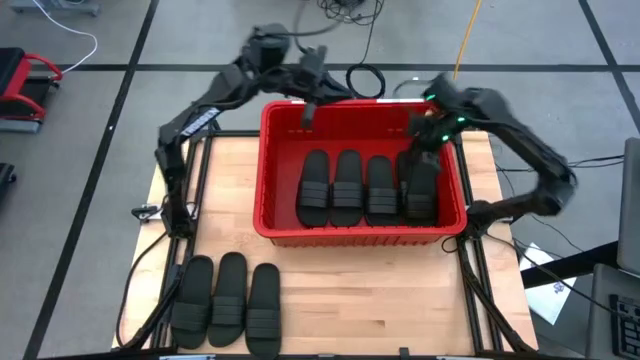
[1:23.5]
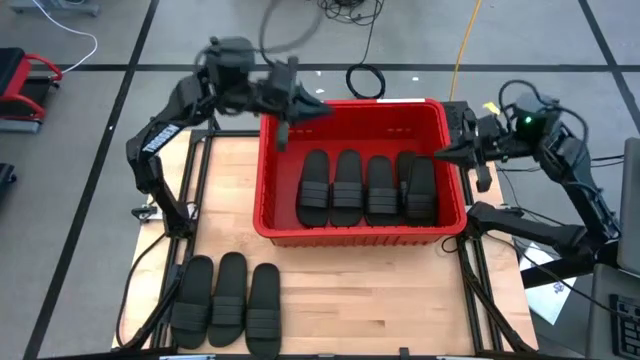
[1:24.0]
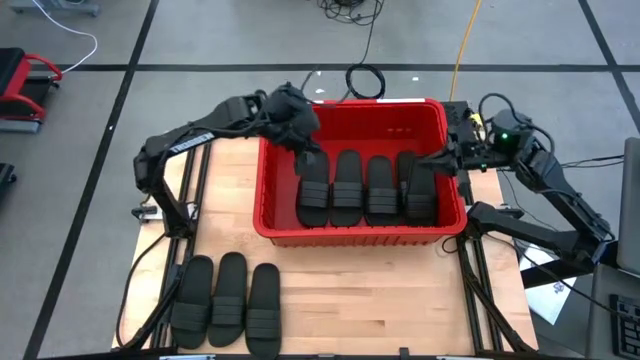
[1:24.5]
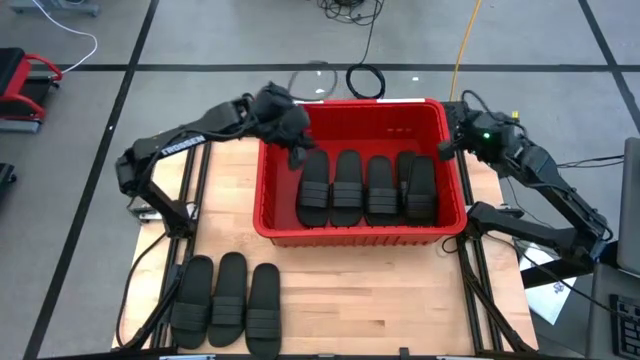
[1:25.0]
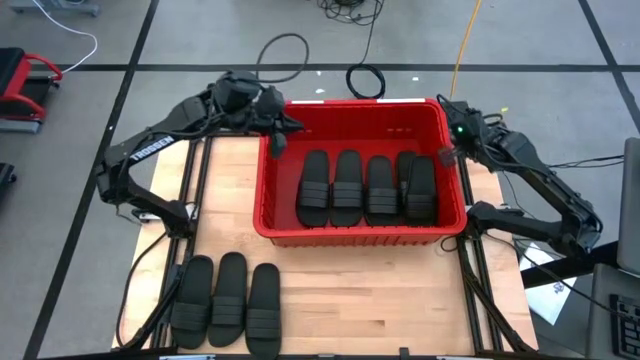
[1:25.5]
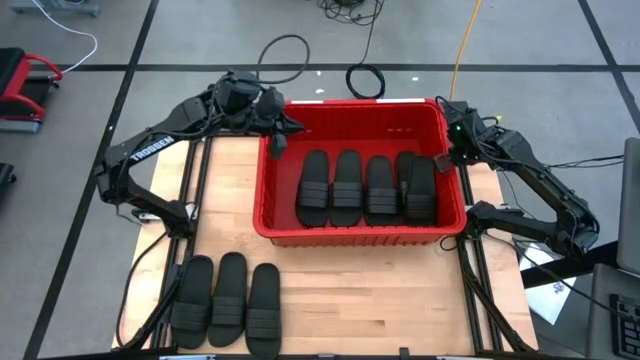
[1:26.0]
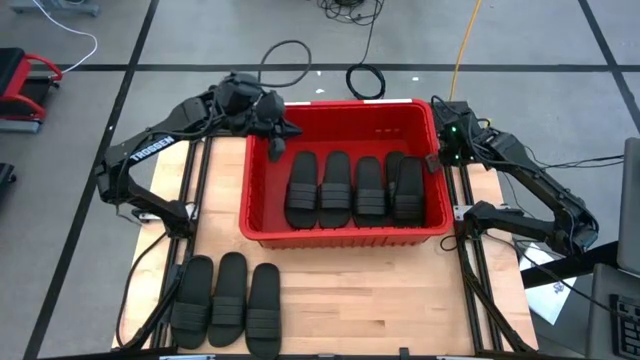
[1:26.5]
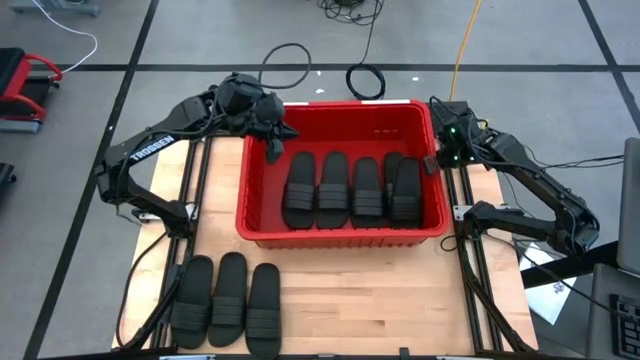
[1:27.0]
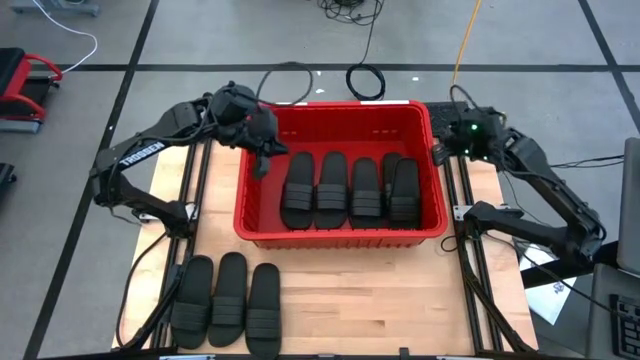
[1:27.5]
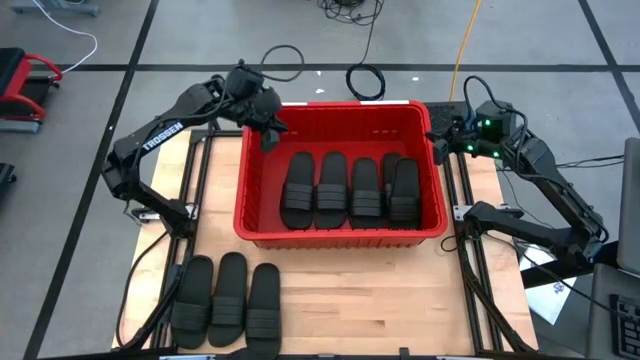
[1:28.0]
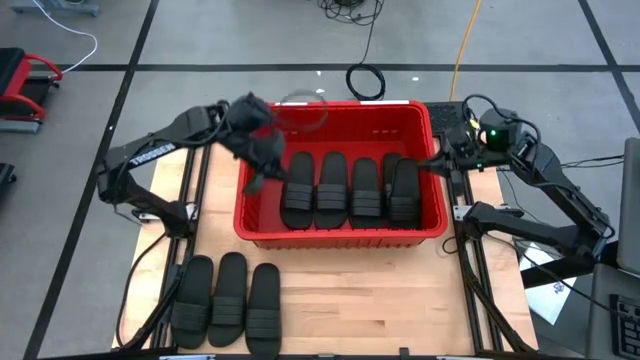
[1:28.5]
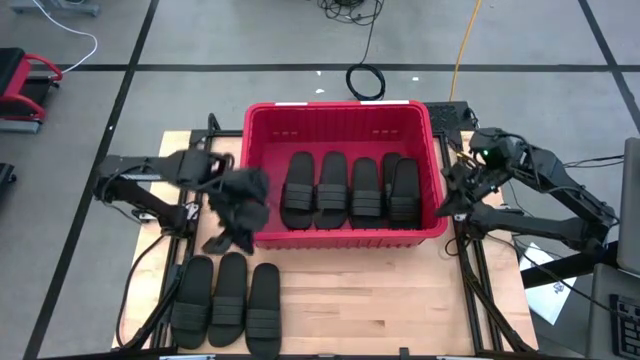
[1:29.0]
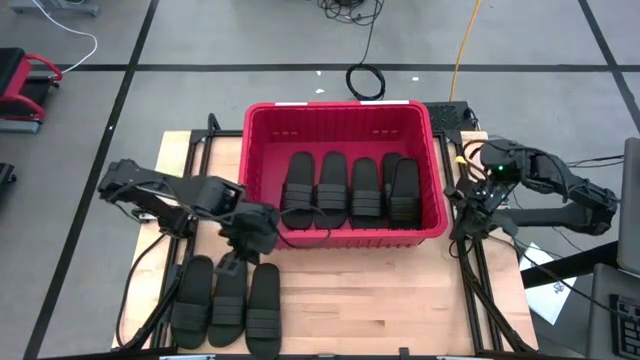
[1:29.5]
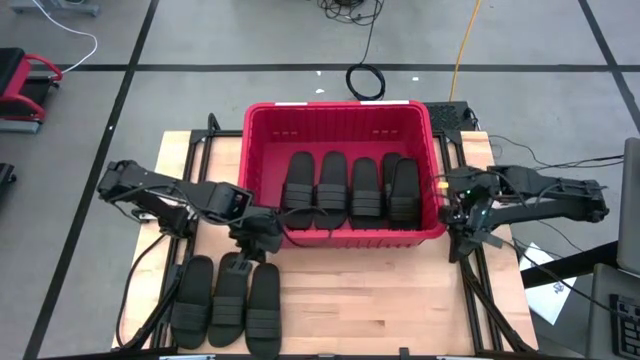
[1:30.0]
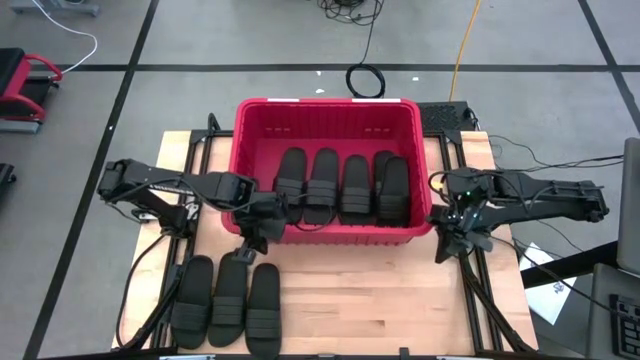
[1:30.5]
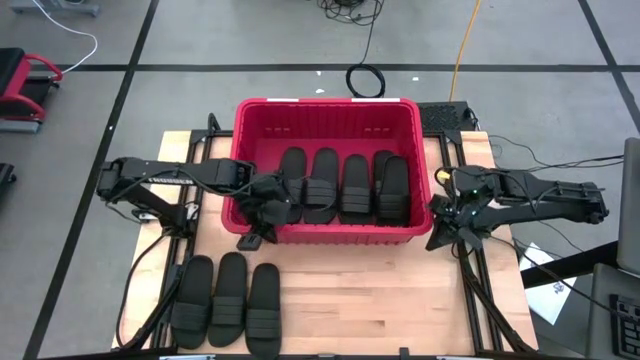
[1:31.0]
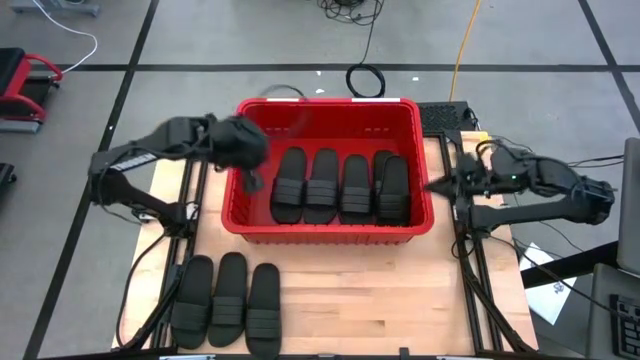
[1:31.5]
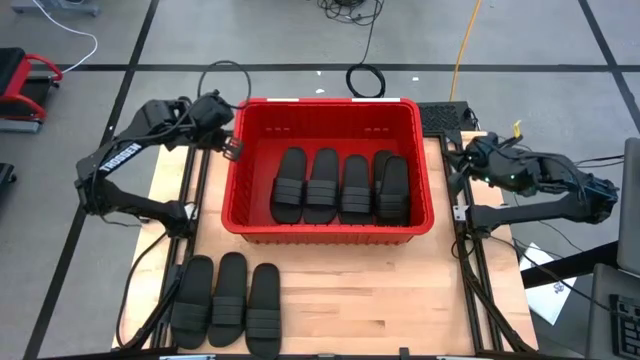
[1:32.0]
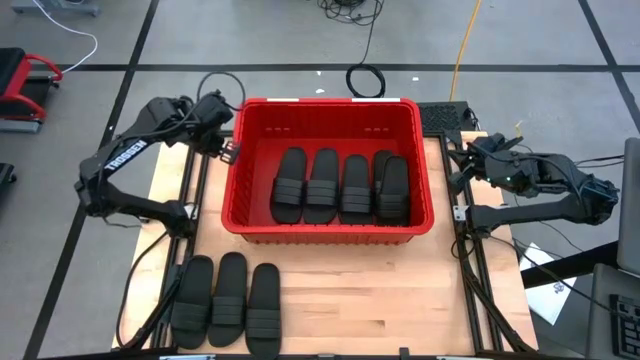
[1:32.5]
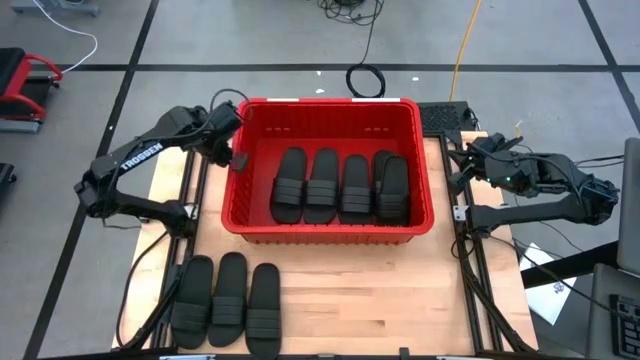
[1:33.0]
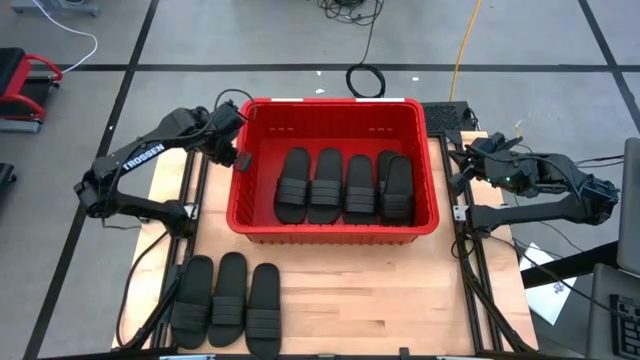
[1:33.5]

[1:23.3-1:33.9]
Task: Pick and place slides into bin
Adjust the red bin

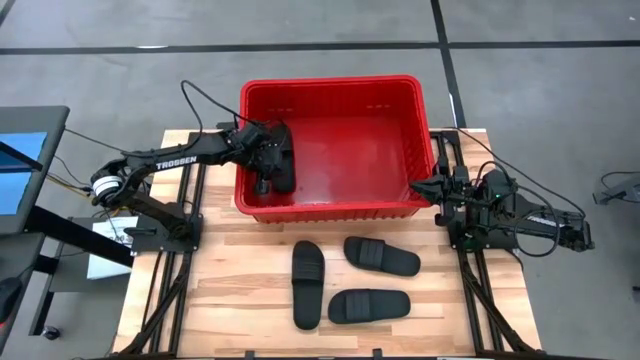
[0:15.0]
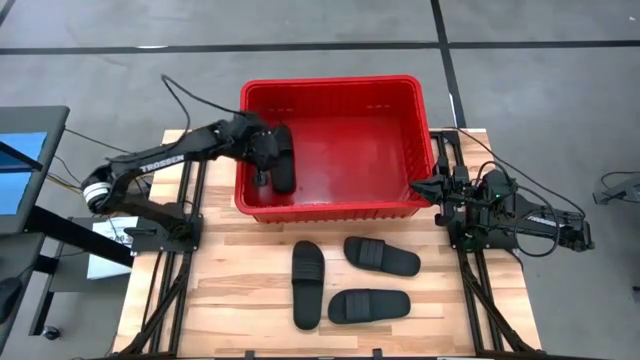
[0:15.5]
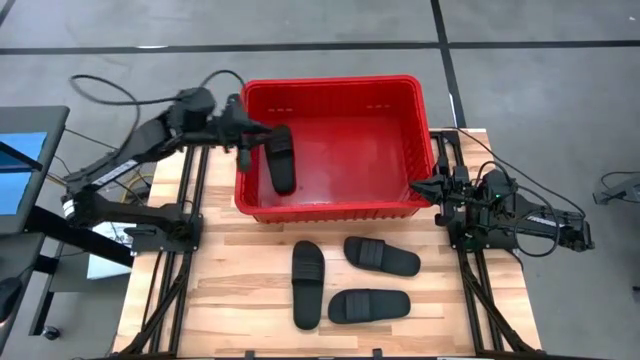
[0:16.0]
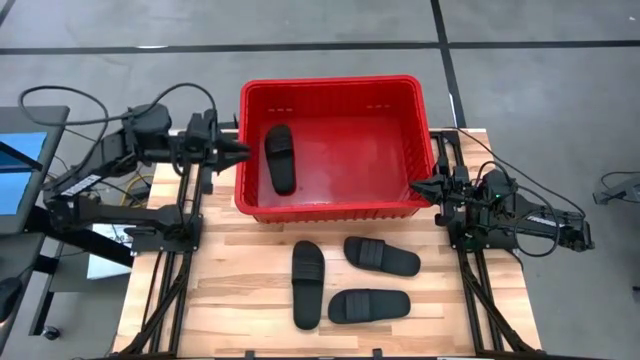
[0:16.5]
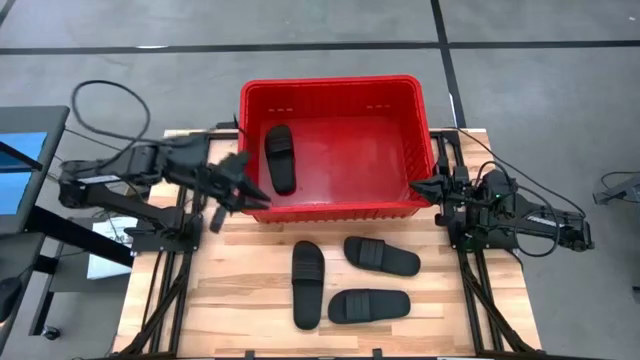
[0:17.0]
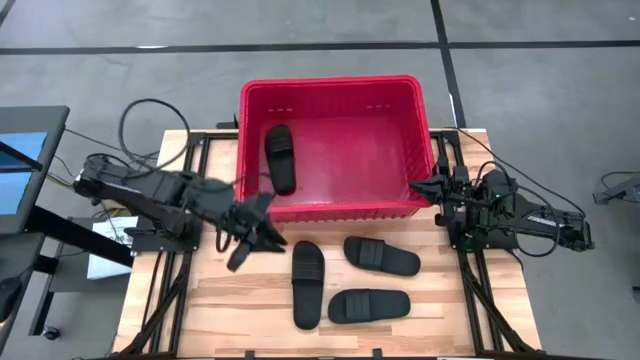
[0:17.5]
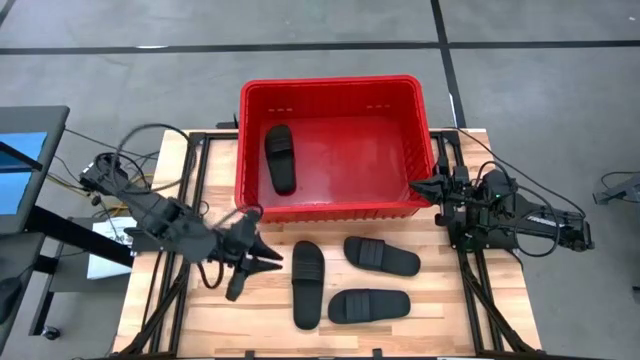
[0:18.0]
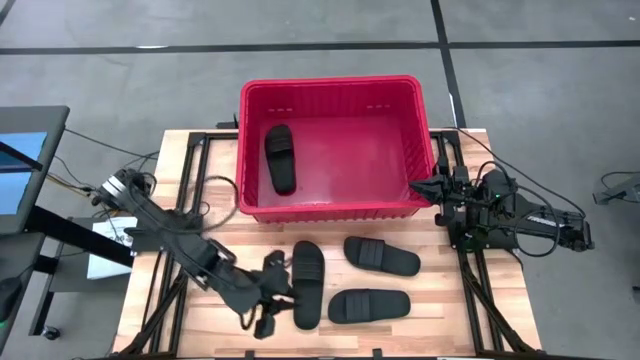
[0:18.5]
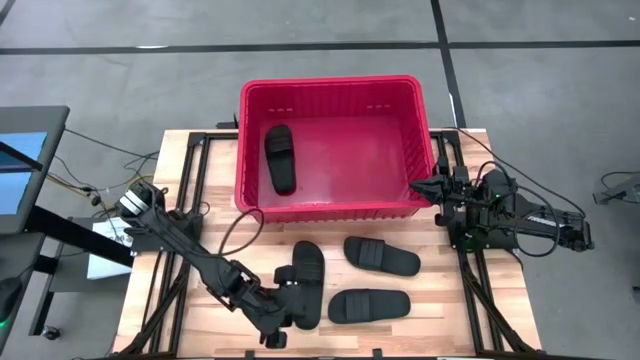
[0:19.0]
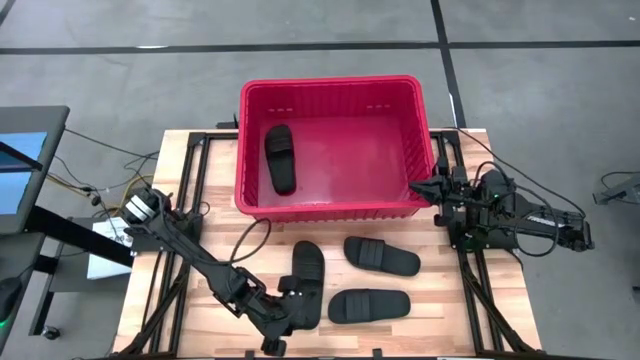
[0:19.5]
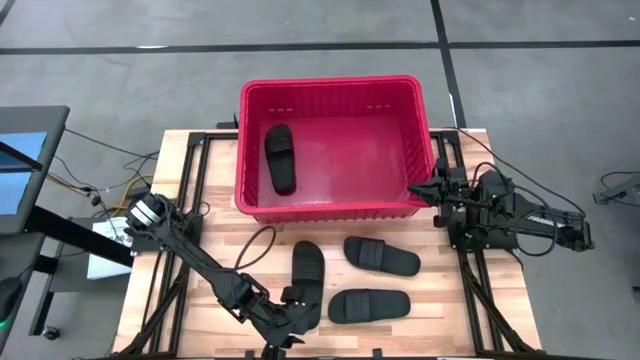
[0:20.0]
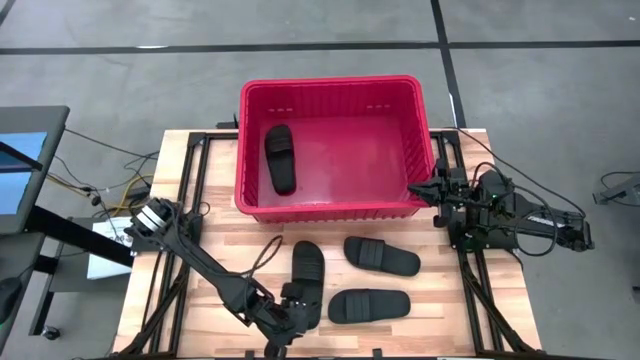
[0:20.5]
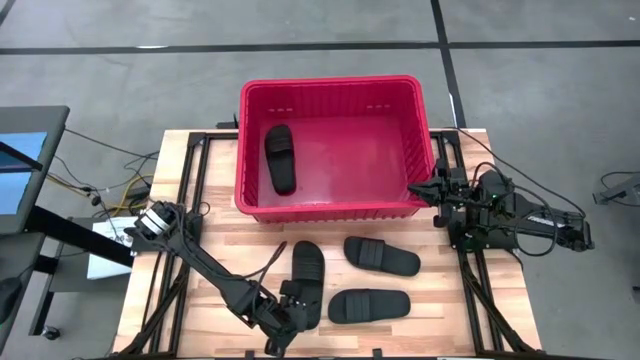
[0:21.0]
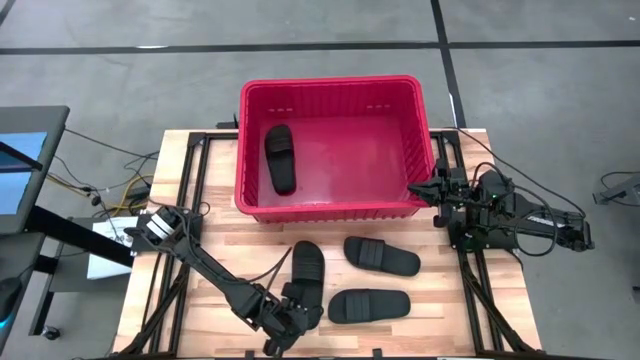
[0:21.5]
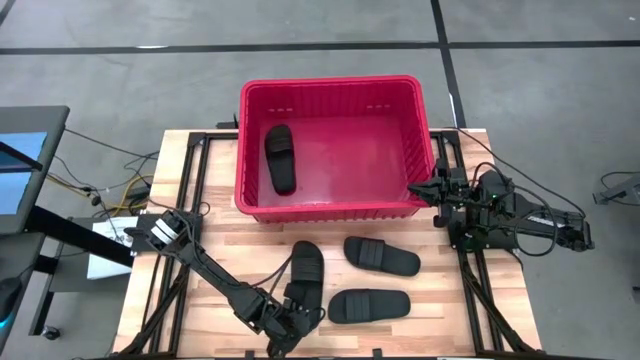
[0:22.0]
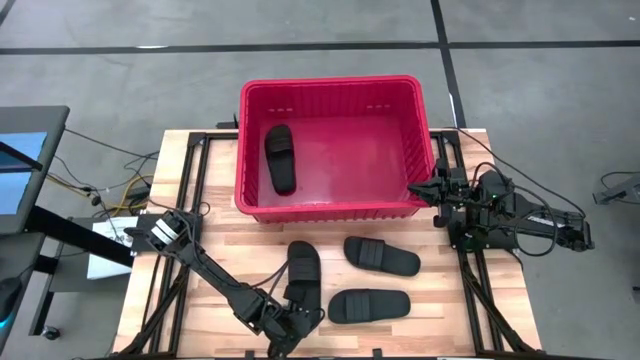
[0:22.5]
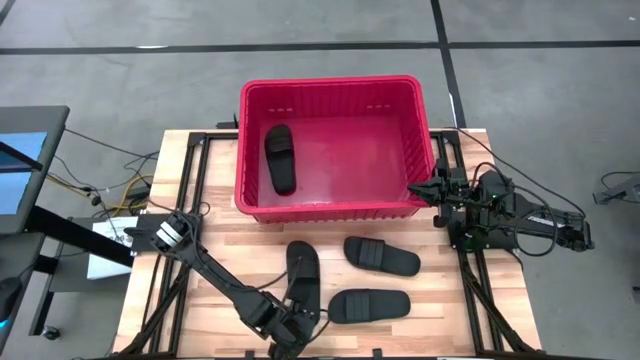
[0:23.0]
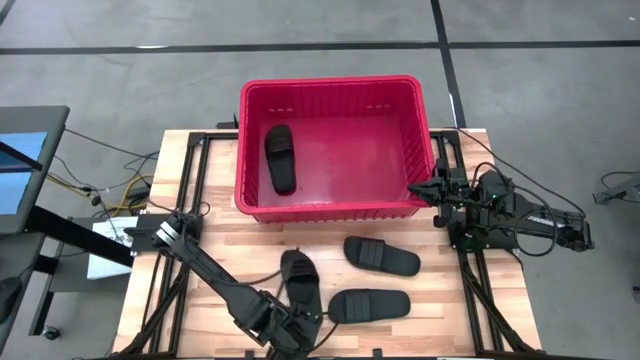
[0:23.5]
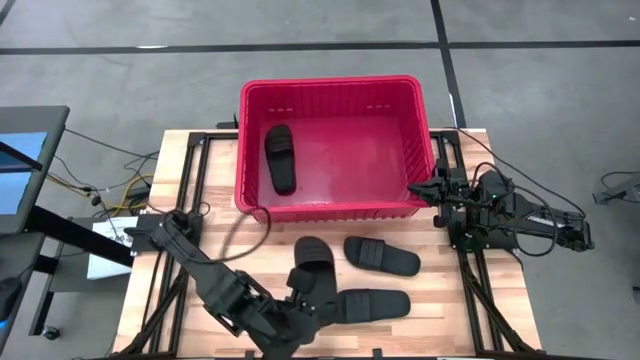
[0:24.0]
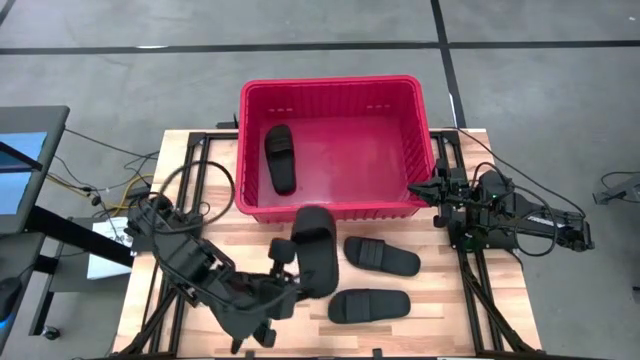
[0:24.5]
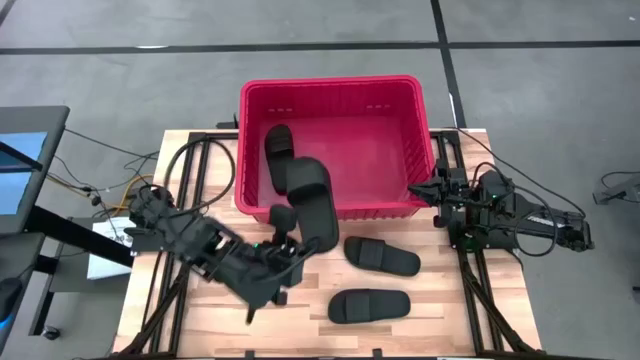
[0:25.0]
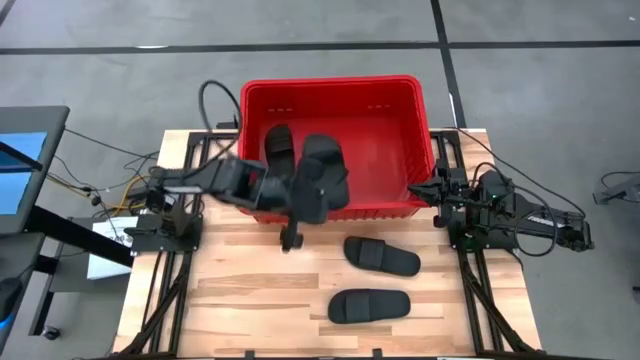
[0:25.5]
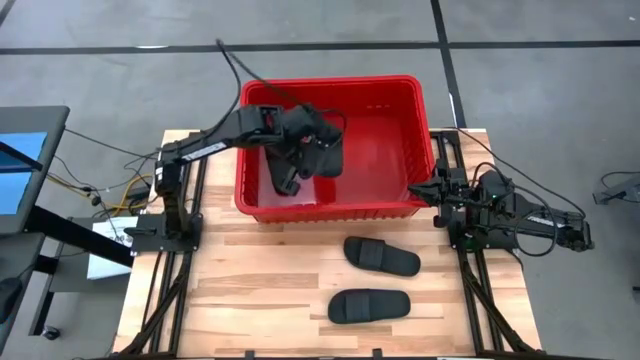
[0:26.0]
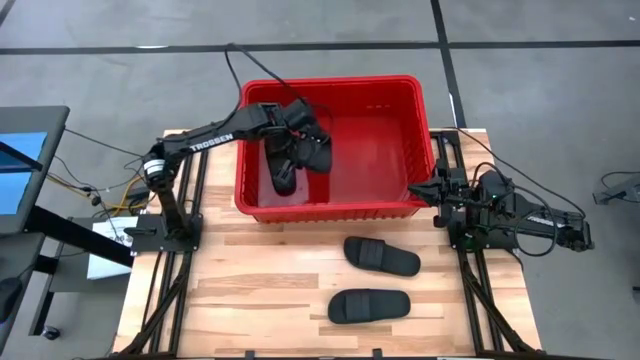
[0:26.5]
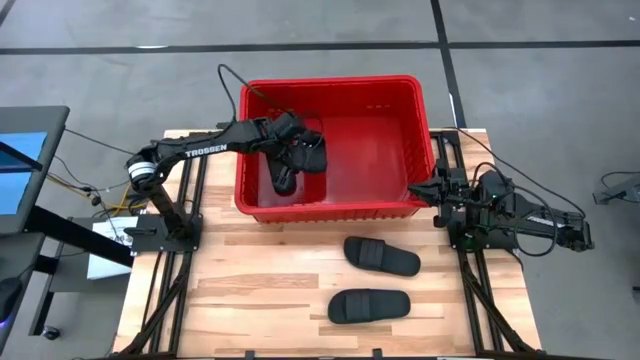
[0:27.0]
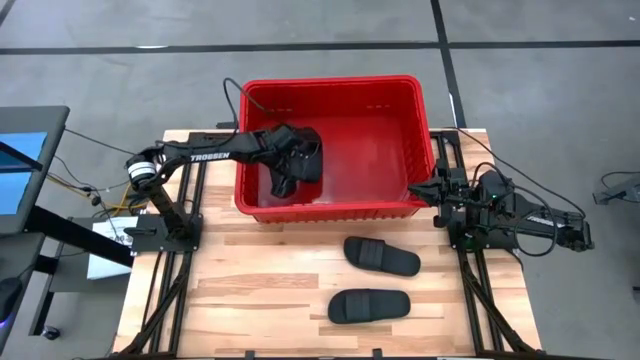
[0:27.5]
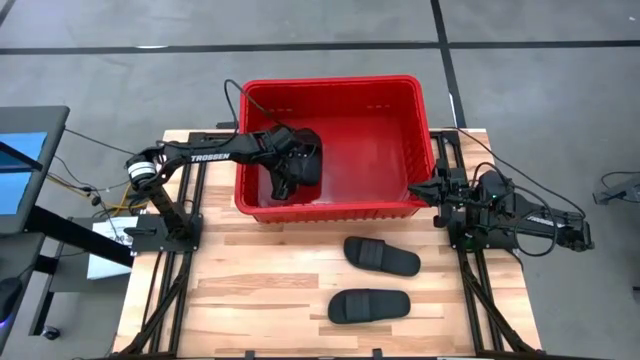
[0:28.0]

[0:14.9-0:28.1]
Task: Pick and place slides into bin
Put the black slipper into the bin
